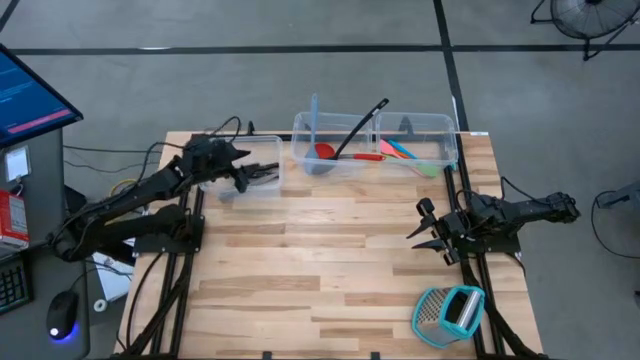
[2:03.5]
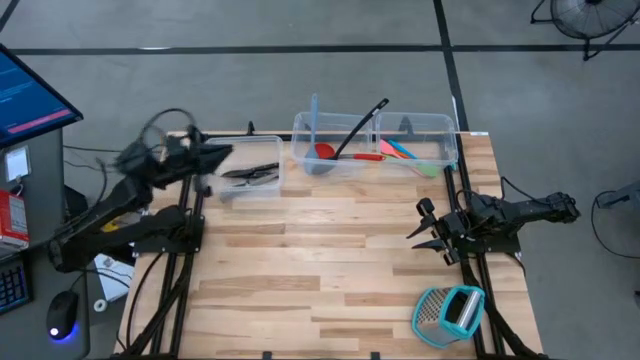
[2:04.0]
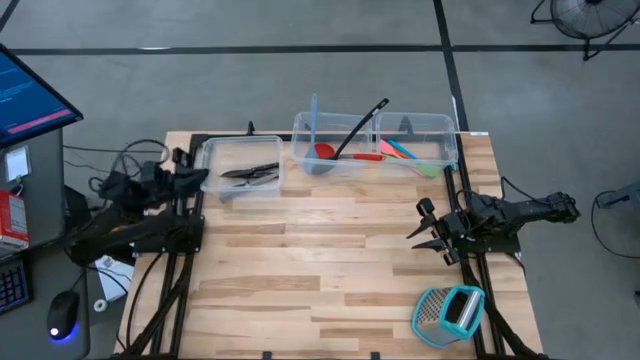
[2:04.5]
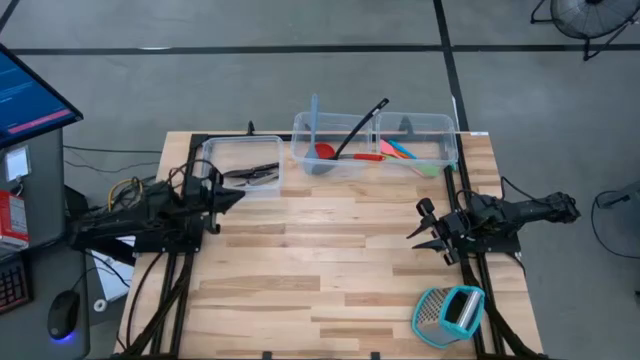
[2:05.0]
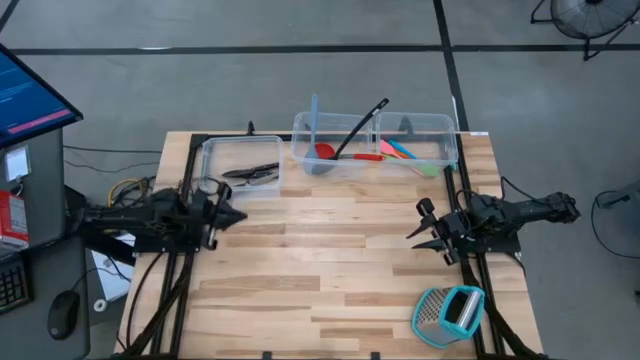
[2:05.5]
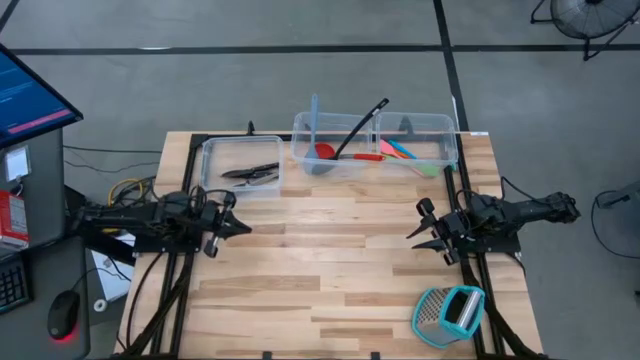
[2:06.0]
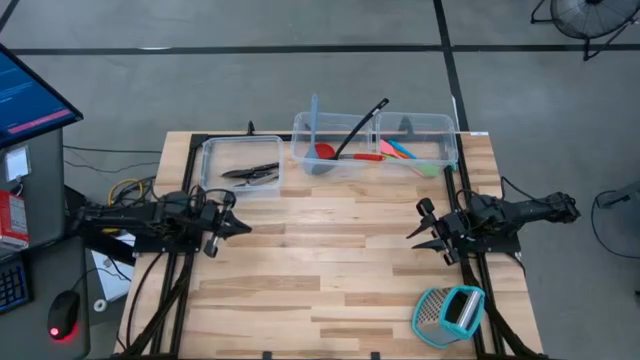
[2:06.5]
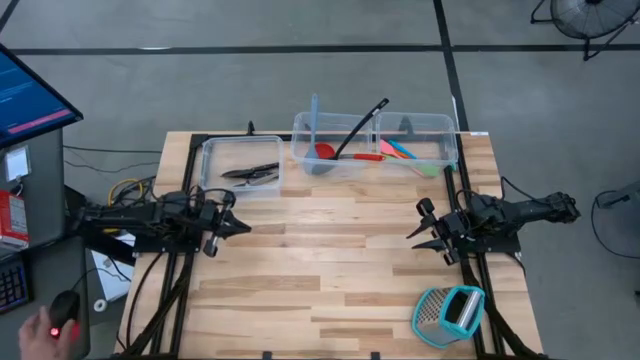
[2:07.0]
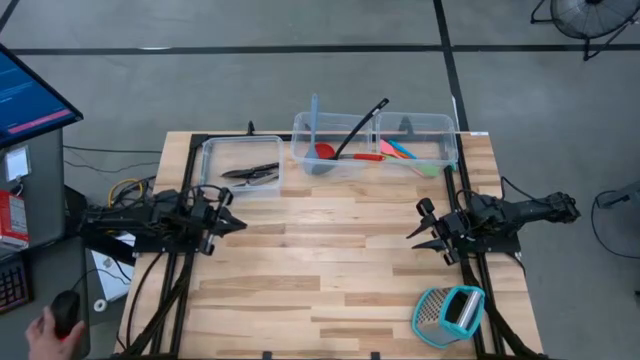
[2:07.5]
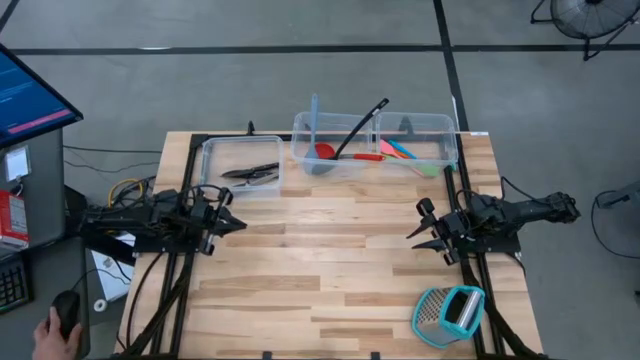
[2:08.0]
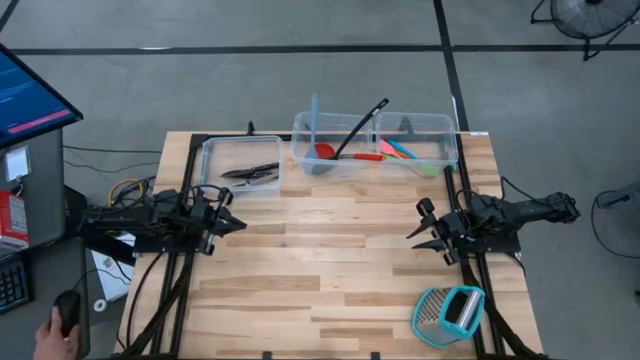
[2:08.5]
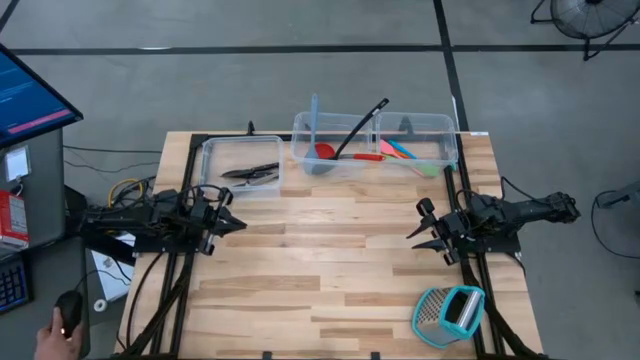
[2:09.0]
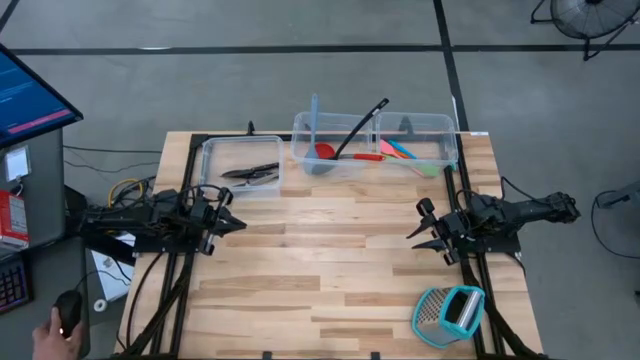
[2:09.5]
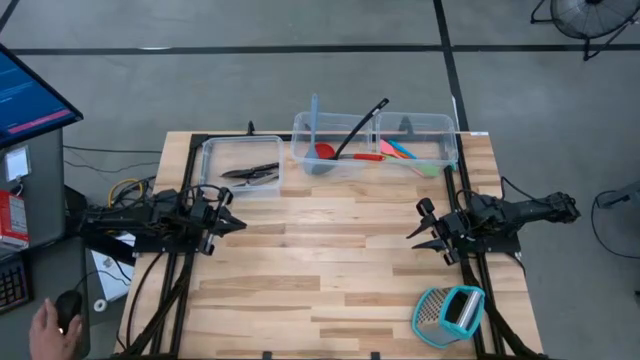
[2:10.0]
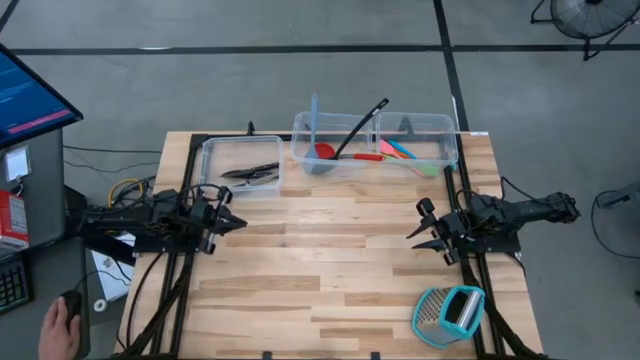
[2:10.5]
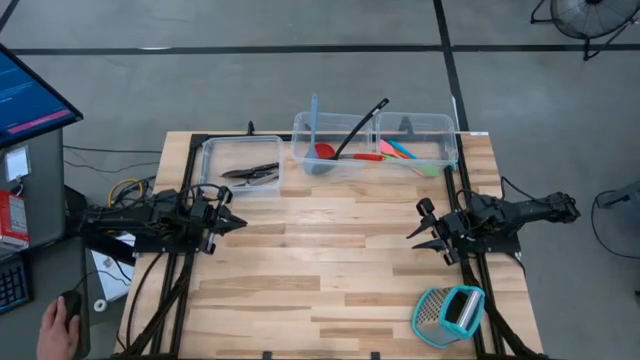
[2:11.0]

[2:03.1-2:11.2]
Task: Pick & Place Kitchen Items
Return to Home Position

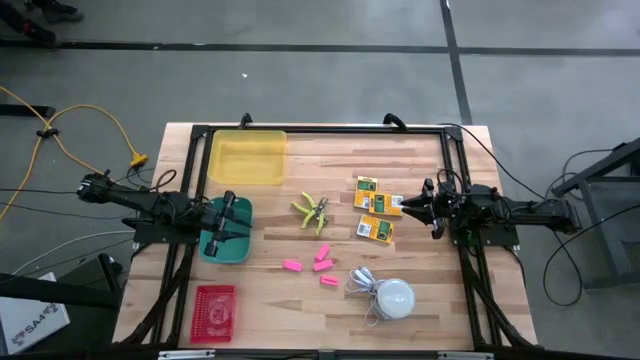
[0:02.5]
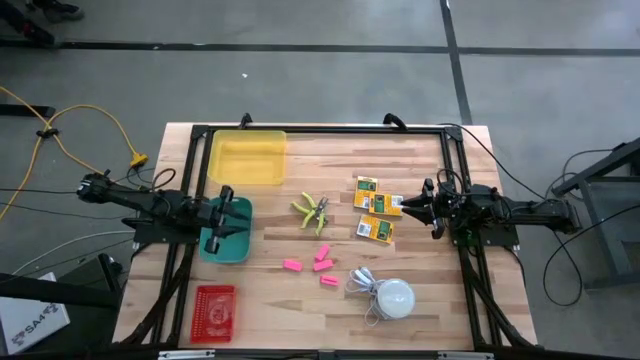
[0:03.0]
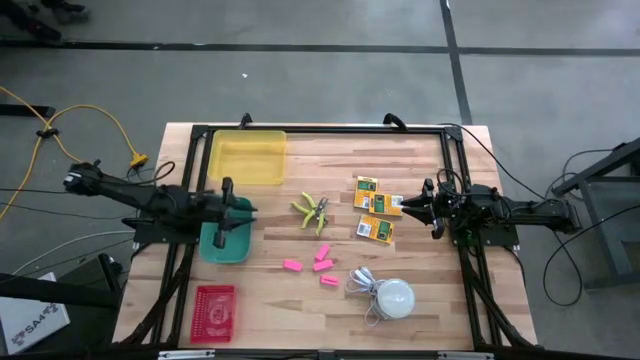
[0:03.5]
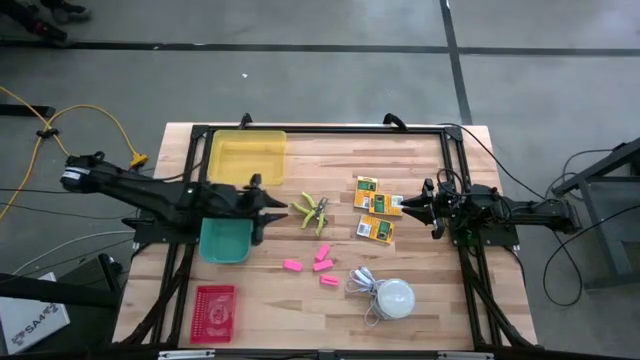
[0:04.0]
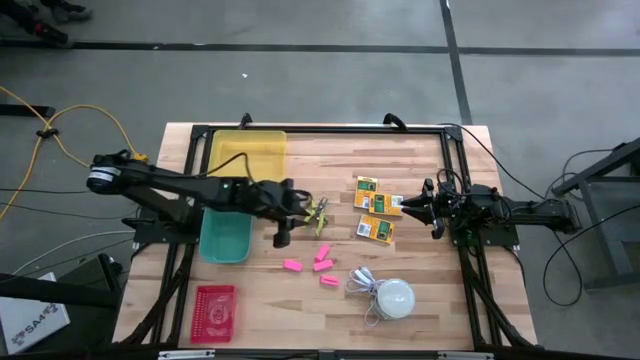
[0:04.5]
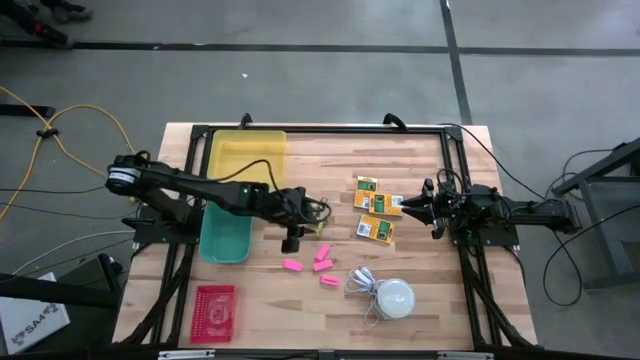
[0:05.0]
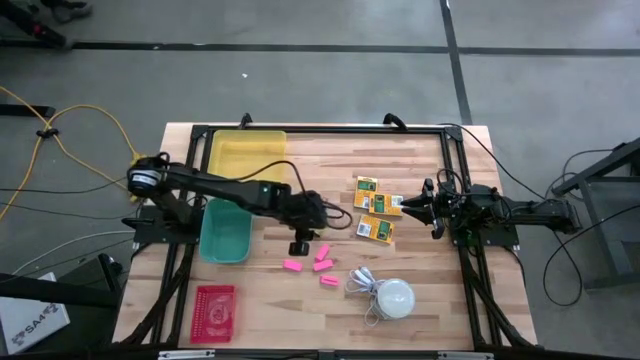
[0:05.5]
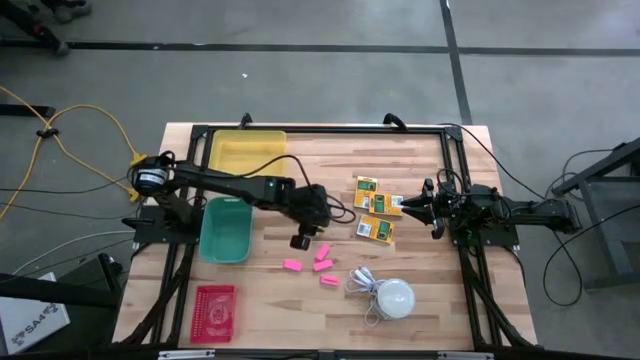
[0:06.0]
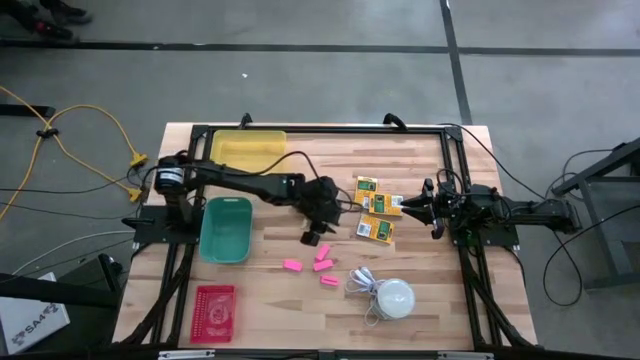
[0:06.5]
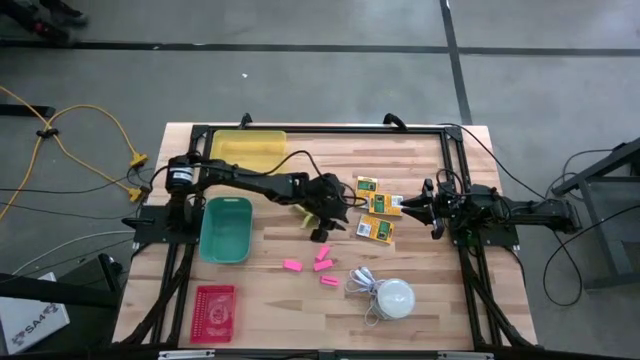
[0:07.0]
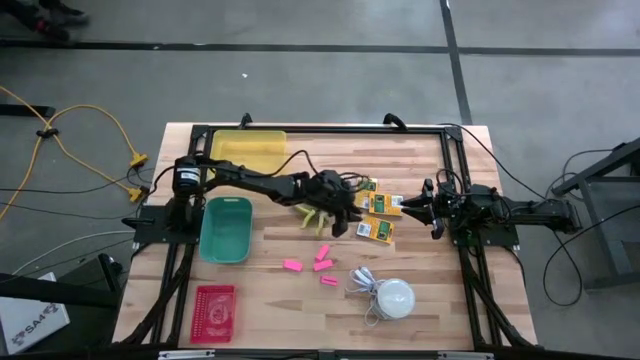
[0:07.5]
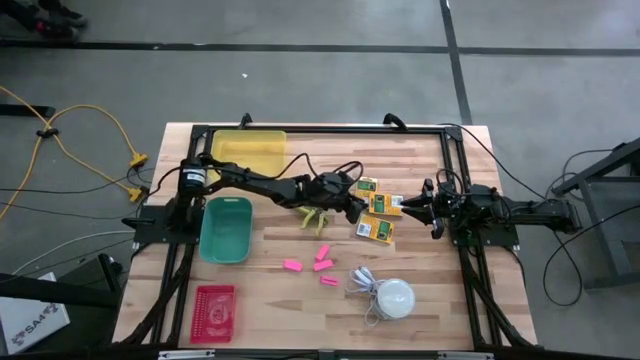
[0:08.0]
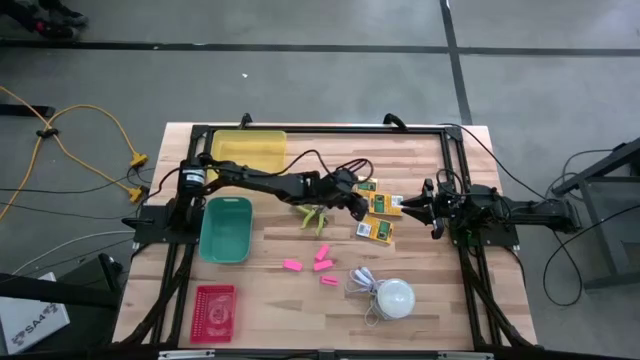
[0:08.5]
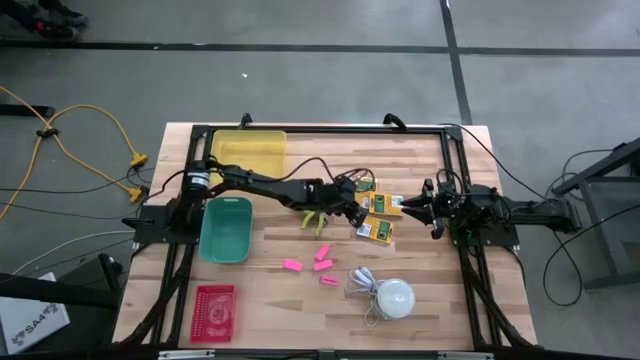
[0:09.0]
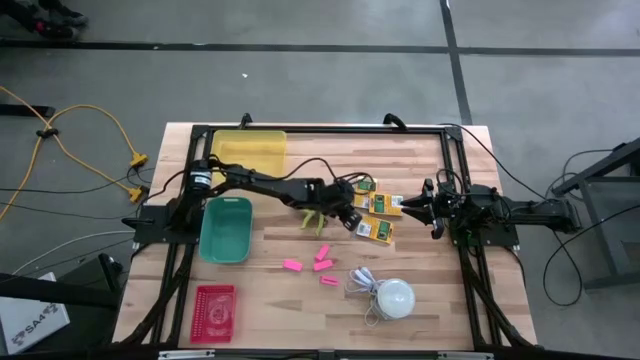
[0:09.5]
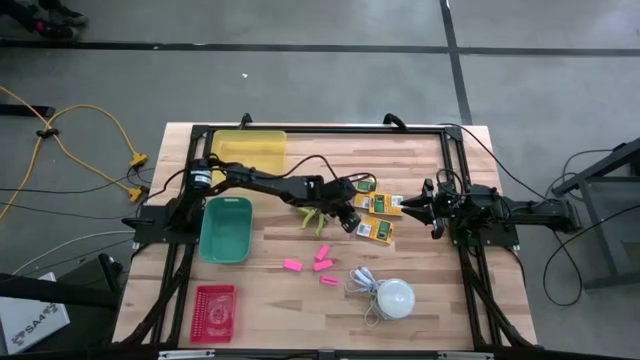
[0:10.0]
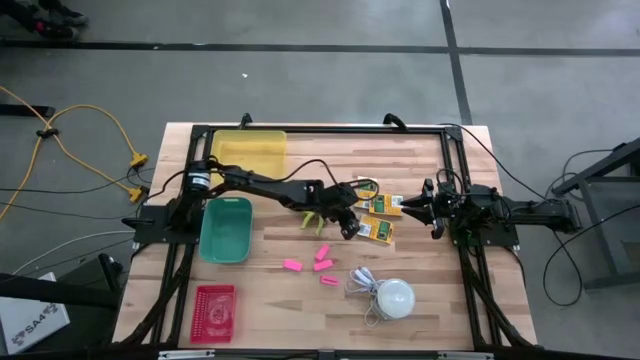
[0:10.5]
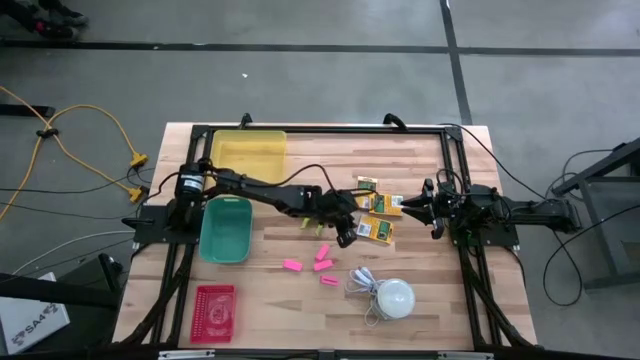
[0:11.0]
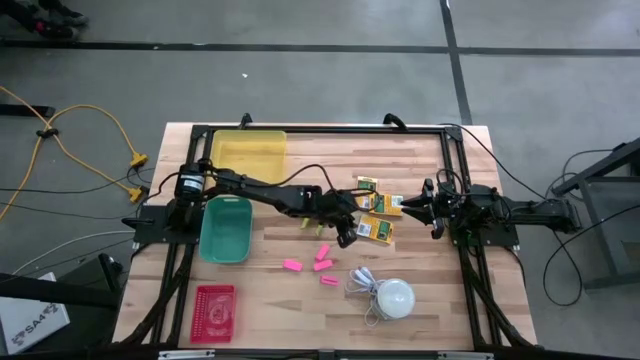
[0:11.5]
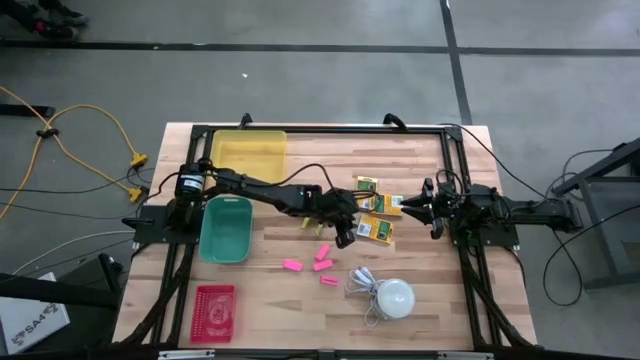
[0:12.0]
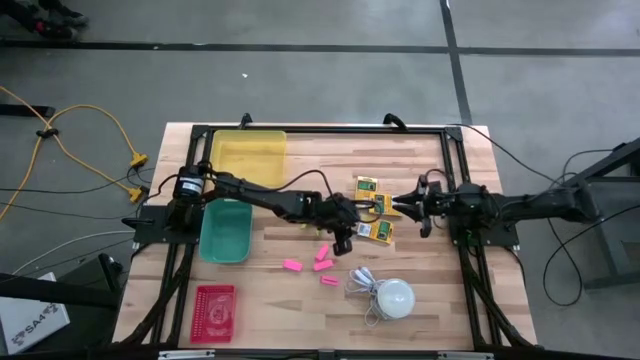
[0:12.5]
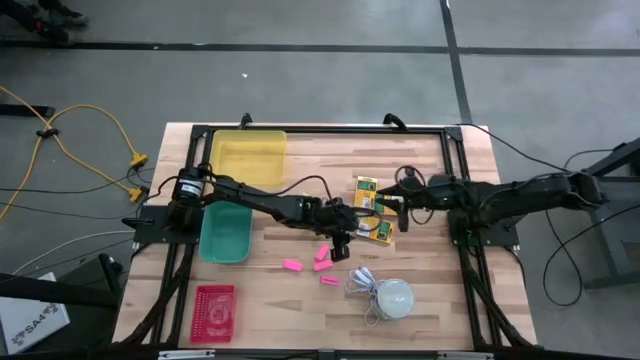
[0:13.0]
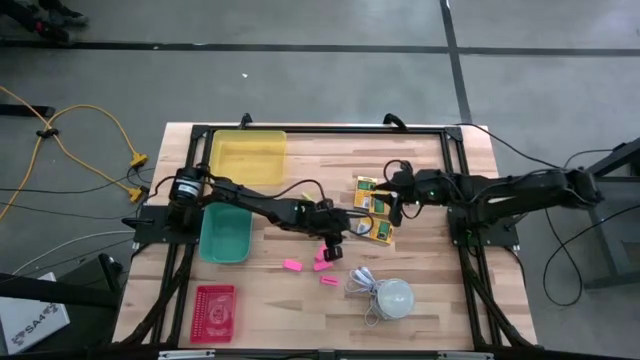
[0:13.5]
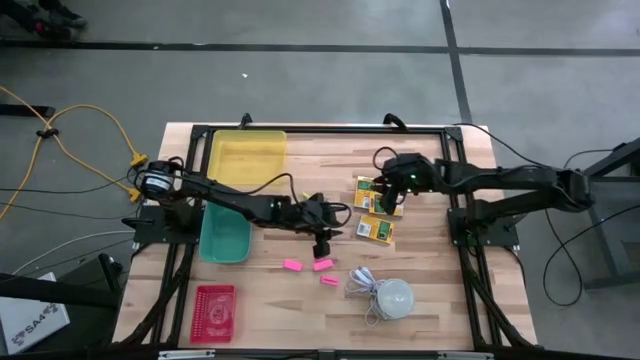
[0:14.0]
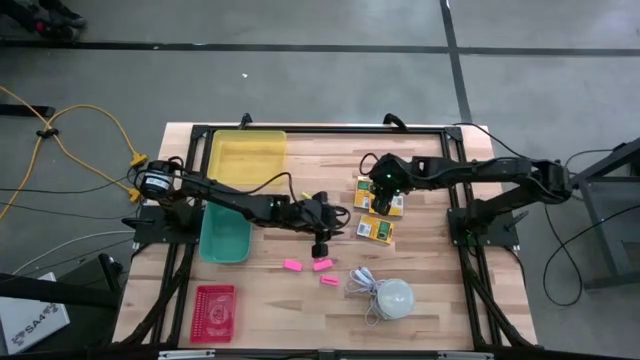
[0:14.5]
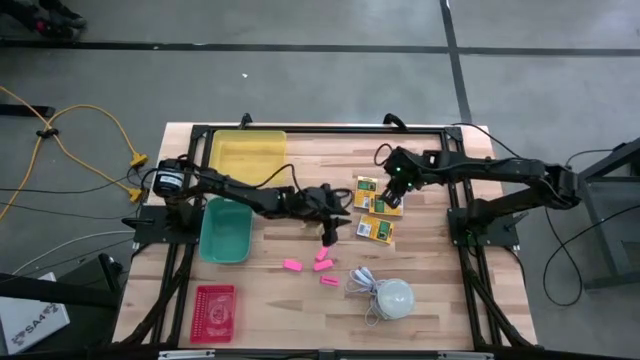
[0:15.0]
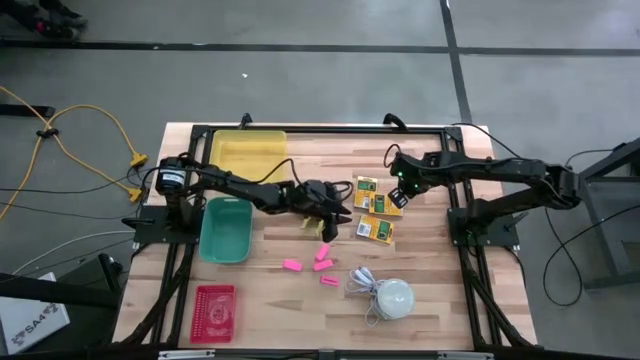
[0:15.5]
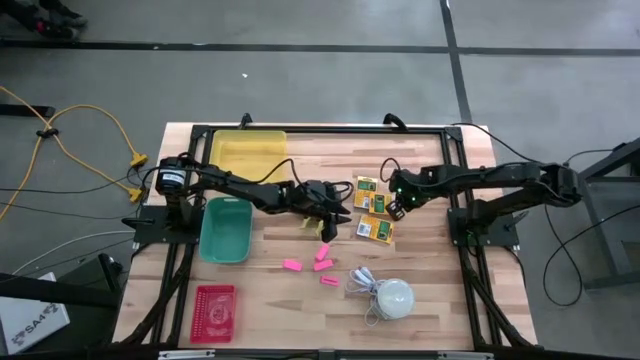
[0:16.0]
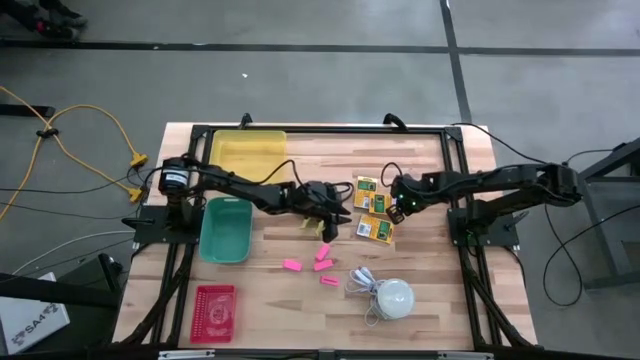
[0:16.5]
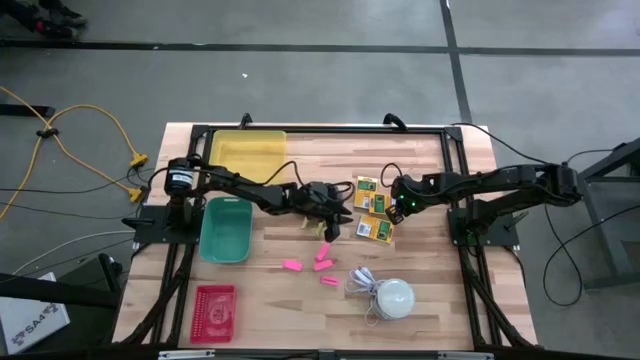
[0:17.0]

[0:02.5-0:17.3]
Task: Pick & Place School Supplies
Put the middle yellow crayon box into the yellow bin
